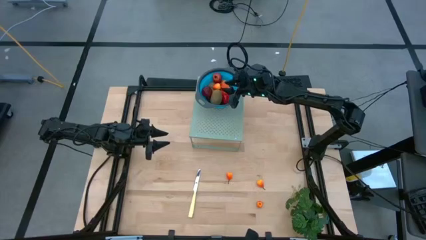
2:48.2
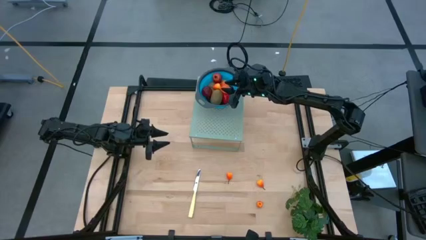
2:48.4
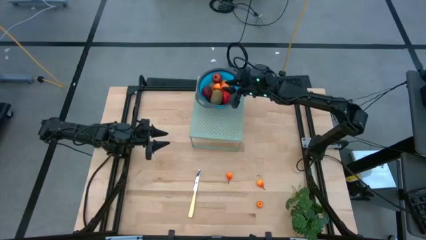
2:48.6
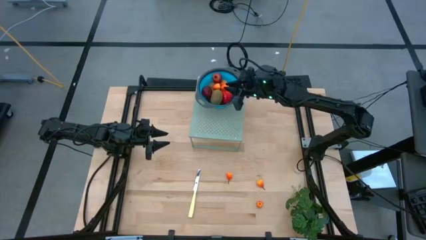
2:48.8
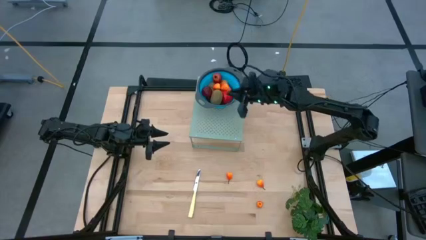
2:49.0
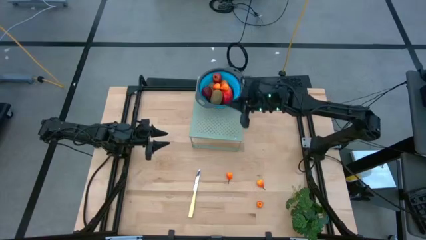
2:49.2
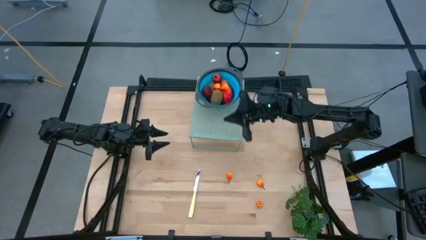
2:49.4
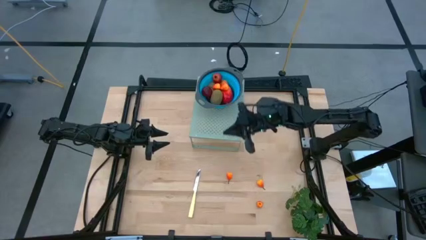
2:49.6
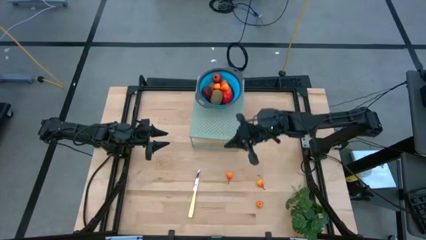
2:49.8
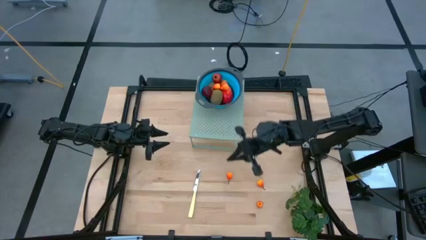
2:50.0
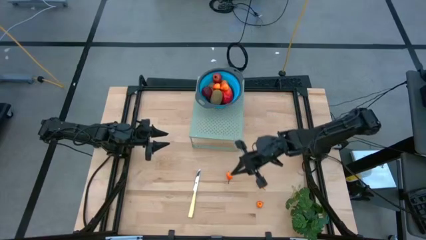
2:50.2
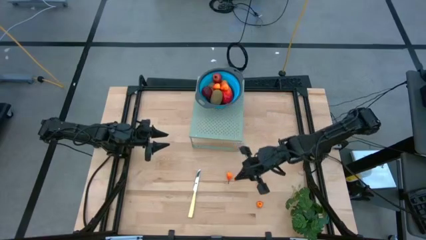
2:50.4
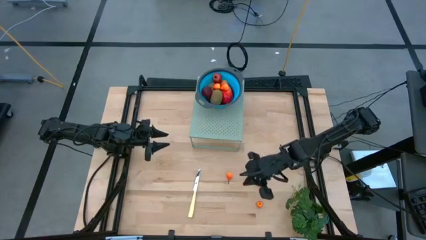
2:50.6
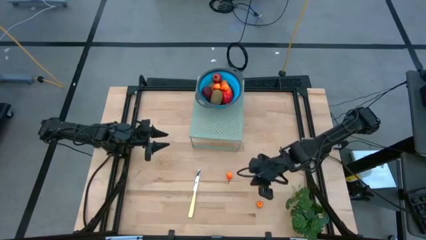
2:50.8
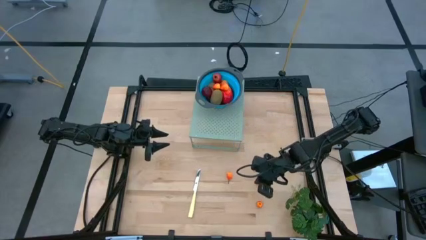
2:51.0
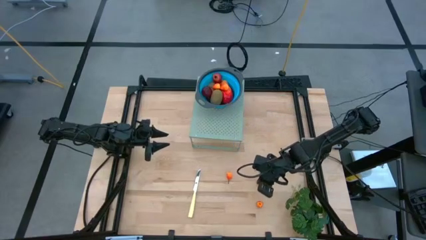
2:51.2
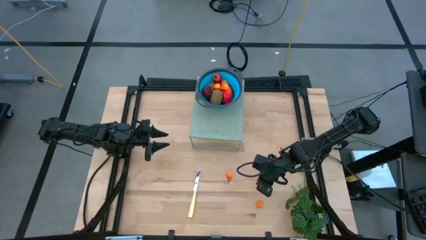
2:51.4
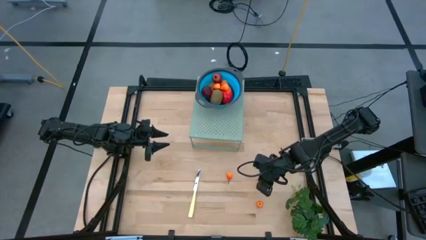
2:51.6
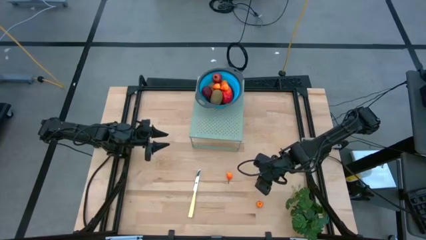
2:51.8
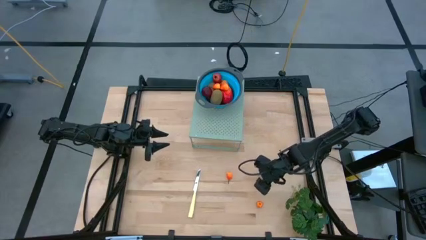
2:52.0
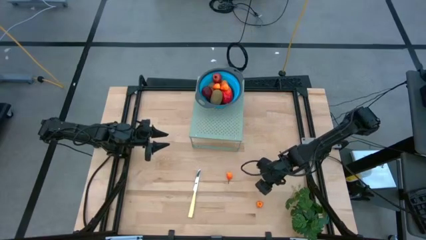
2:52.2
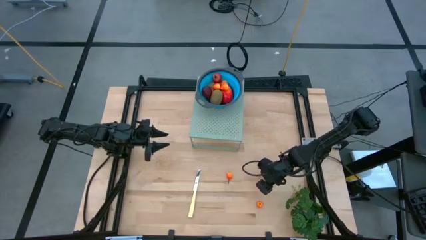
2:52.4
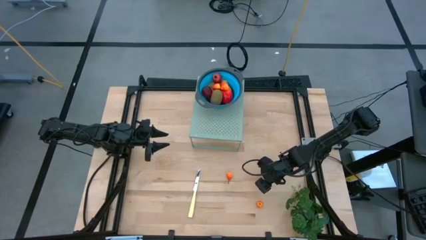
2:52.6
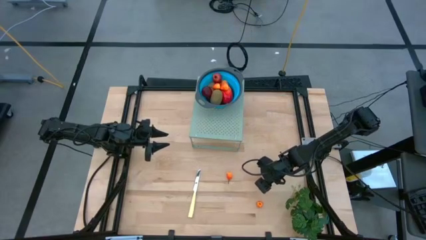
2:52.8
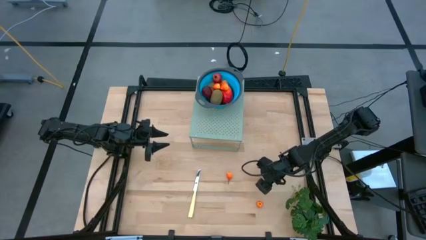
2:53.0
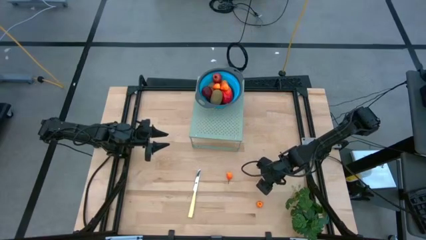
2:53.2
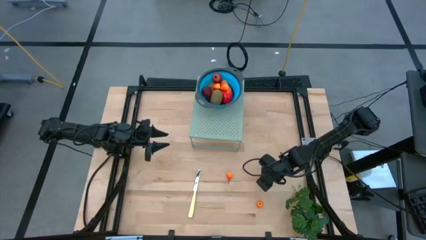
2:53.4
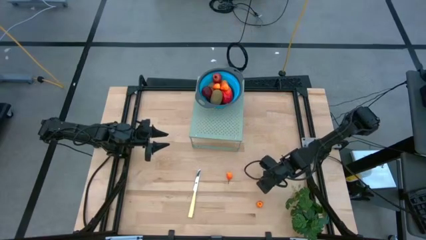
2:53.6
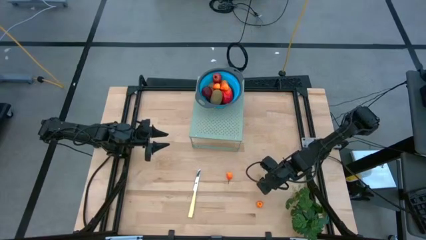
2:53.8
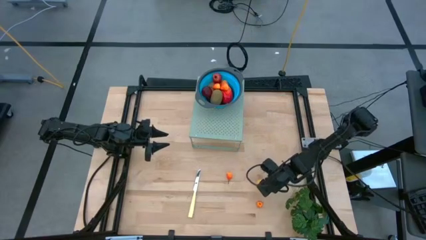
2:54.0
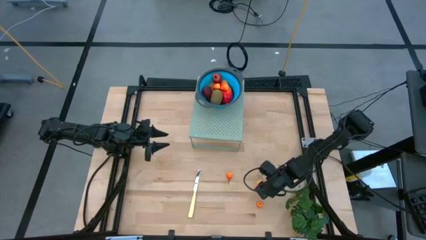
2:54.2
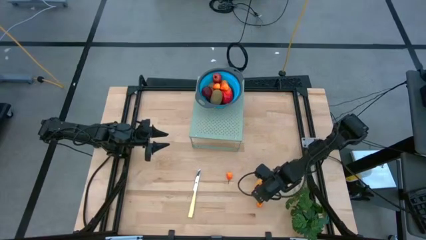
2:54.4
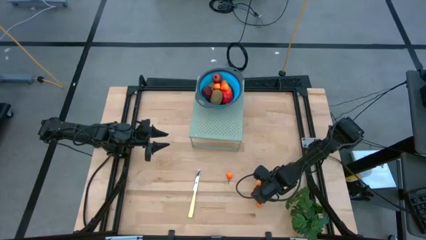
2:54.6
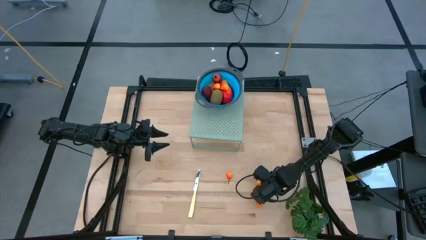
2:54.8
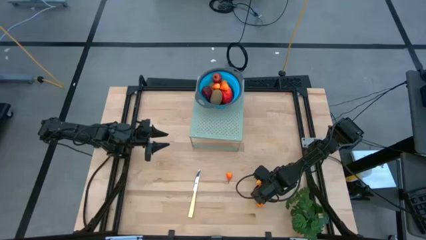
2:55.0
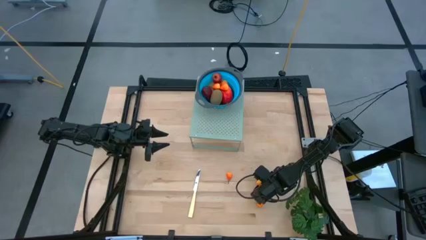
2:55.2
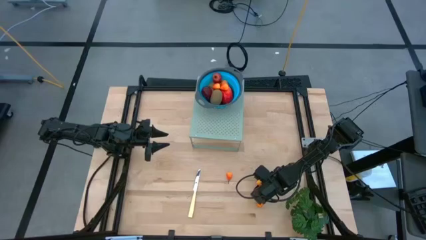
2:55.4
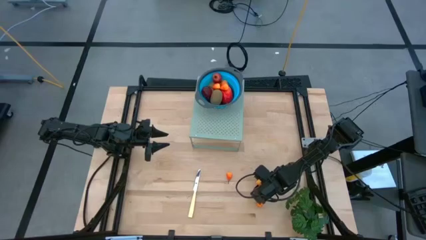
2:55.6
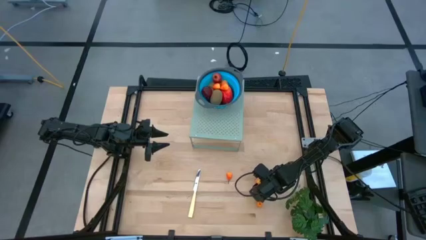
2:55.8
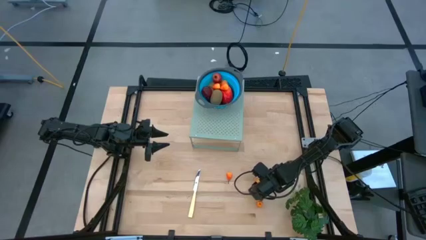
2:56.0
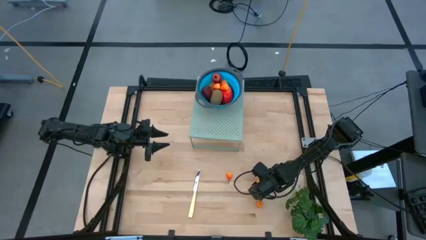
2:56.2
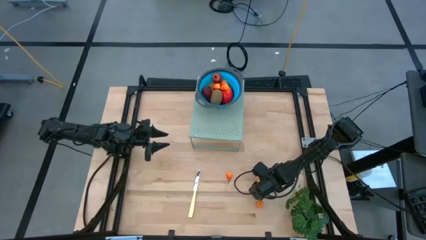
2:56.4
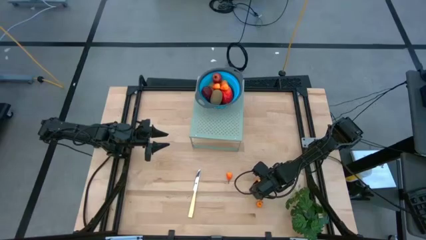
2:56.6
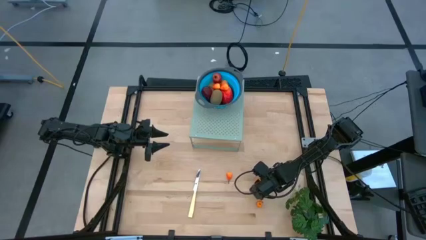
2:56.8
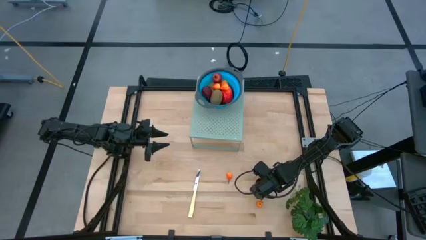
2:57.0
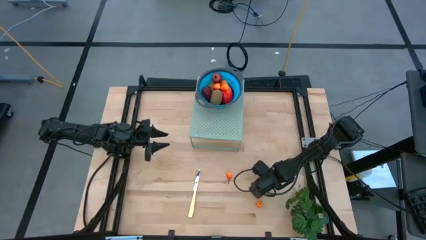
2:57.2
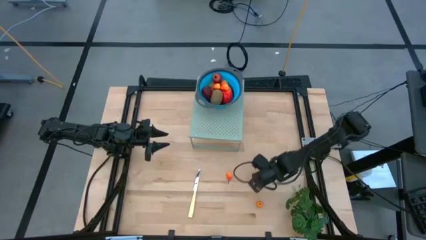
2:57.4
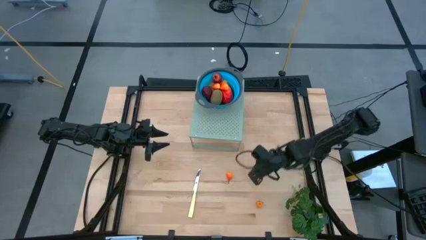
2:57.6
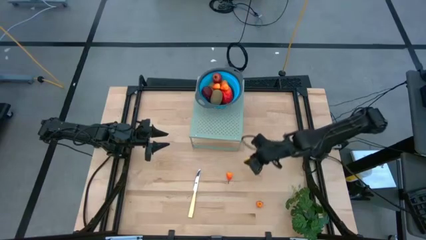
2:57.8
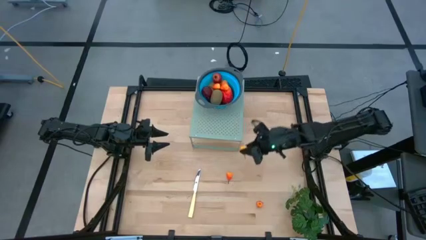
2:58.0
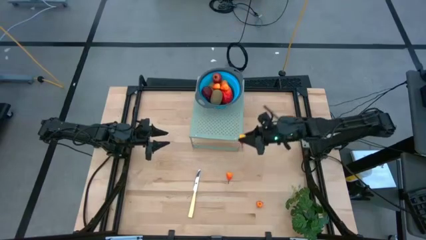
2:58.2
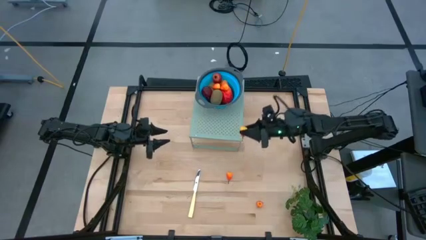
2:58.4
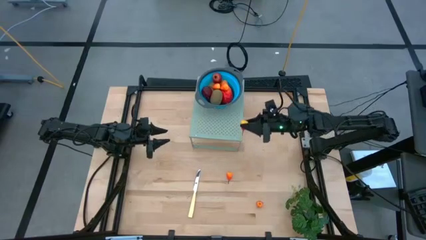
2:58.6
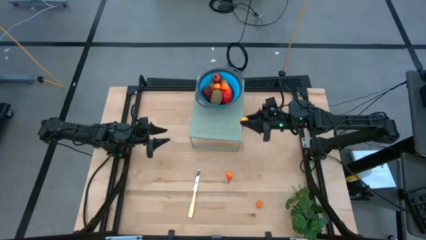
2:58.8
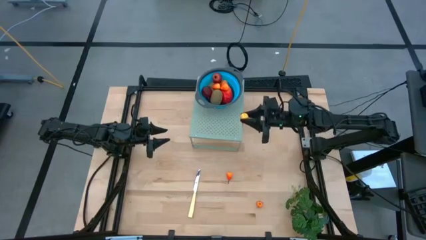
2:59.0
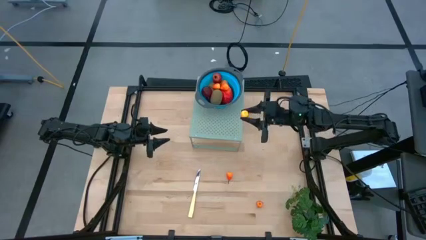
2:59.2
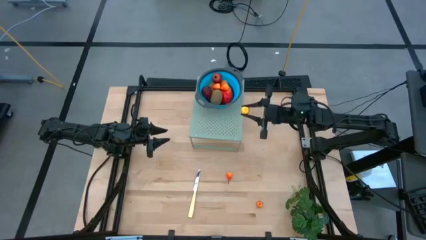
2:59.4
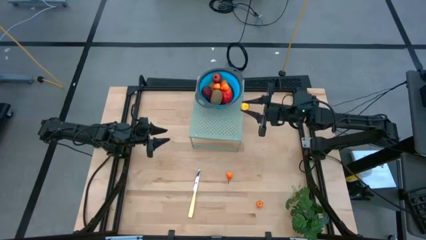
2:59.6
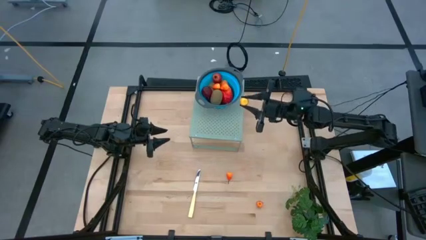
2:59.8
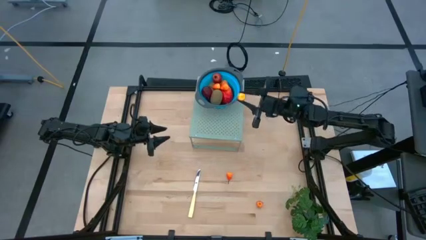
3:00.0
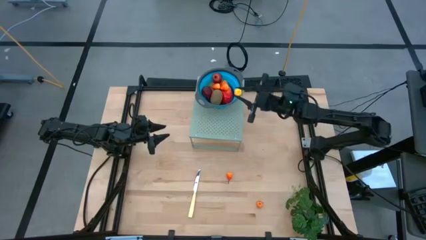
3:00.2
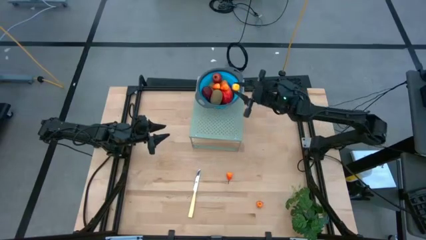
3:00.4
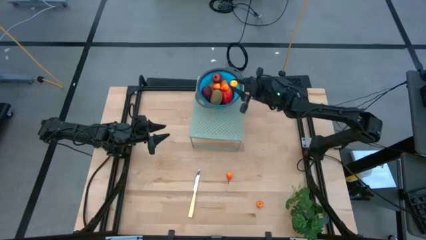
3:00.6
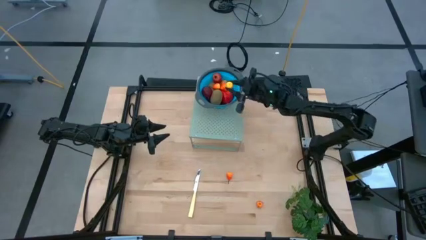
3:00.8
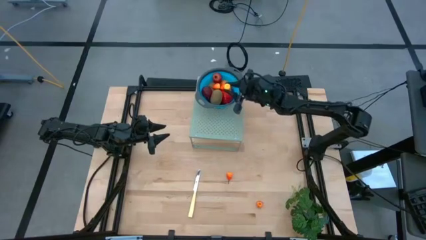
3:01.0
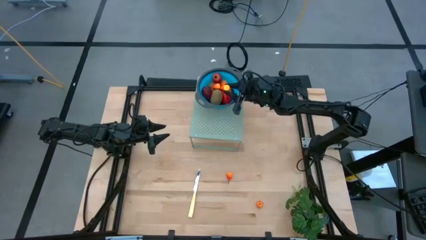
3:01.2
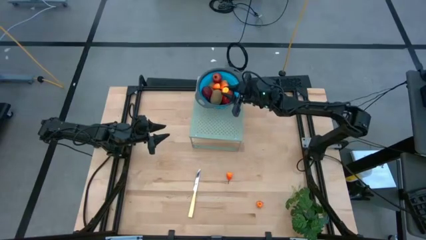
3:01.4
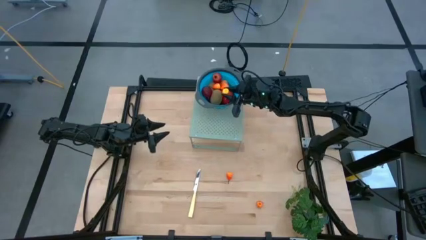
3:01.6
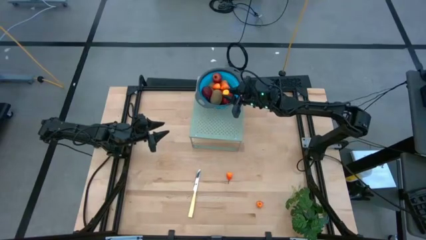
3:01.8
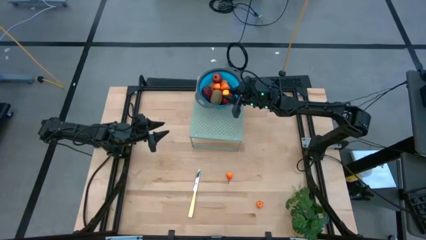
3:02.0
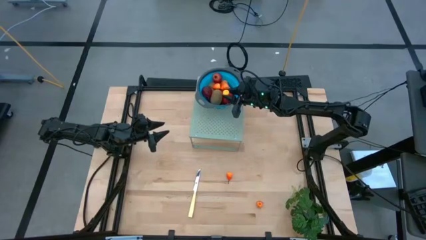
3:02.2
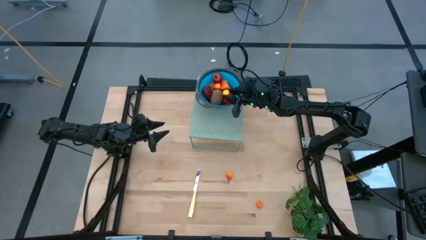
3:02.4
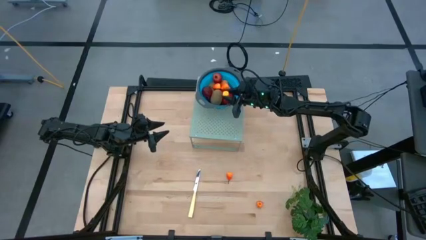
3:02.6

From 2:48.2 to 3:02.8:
Task: Pick & Place Fruit
Put the peach into the blue strainer bowl on the shelf
